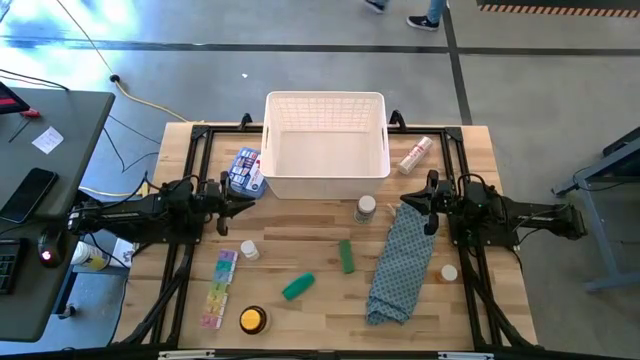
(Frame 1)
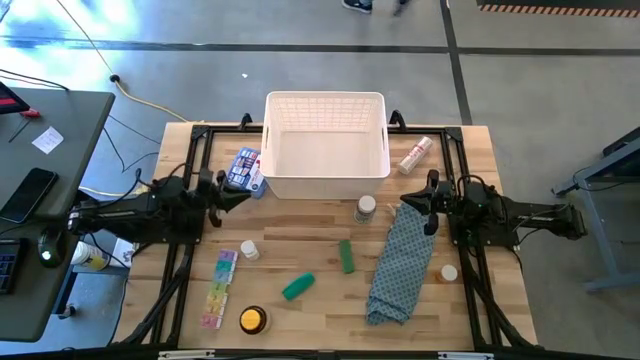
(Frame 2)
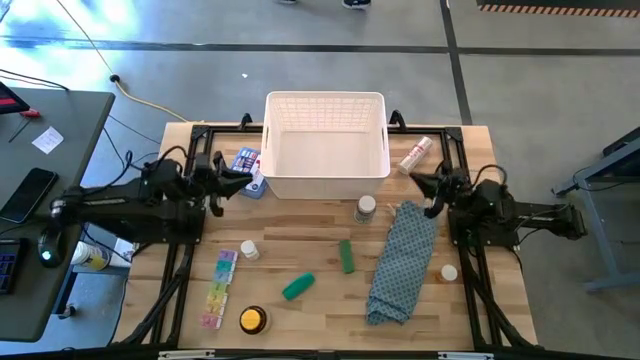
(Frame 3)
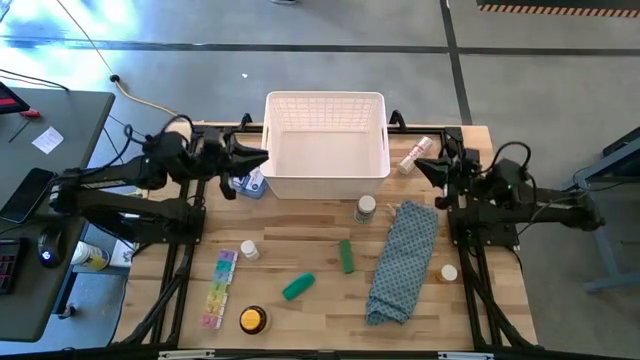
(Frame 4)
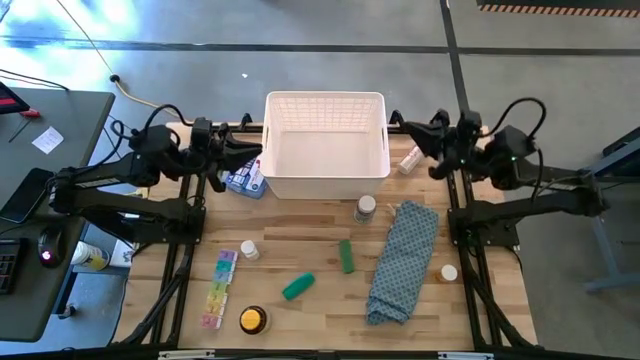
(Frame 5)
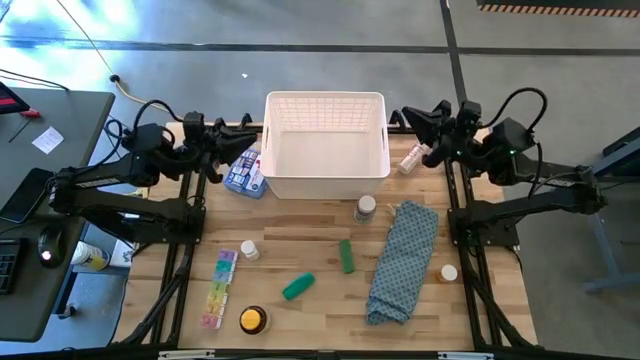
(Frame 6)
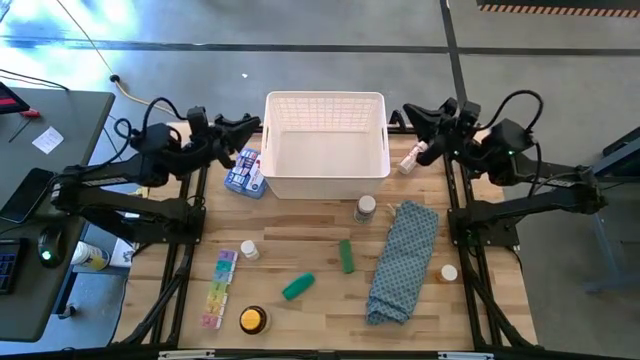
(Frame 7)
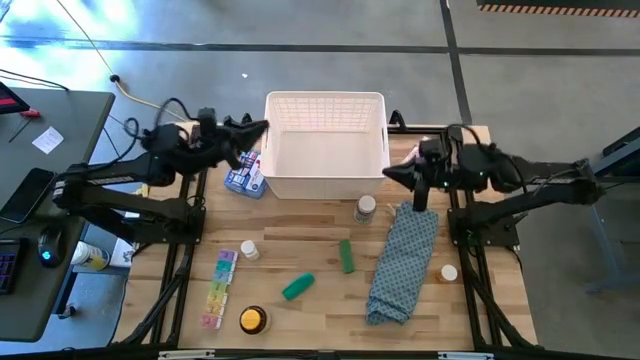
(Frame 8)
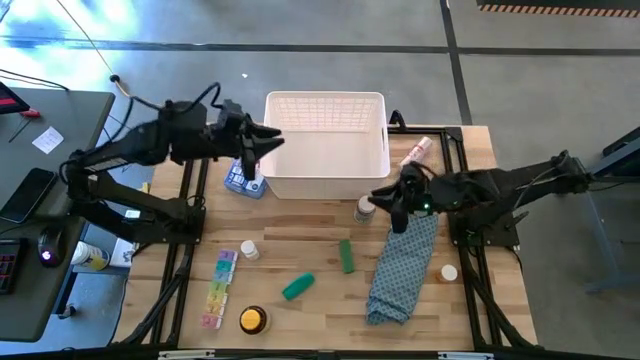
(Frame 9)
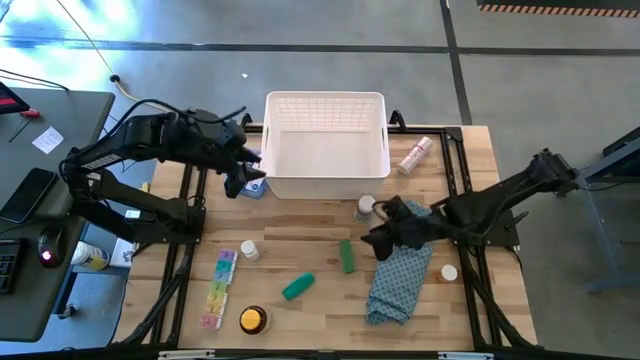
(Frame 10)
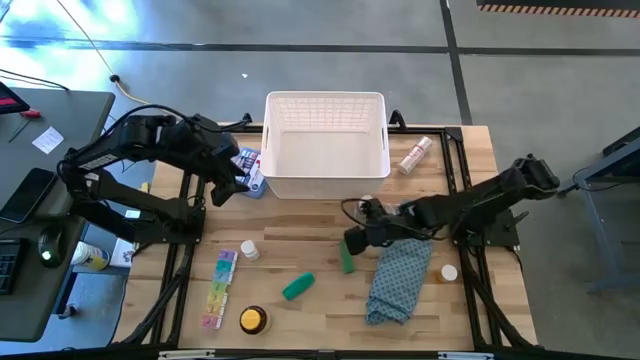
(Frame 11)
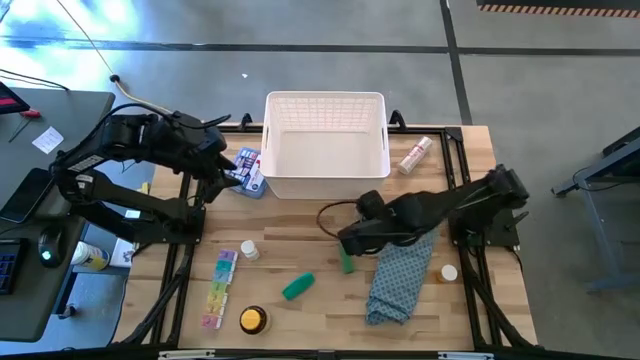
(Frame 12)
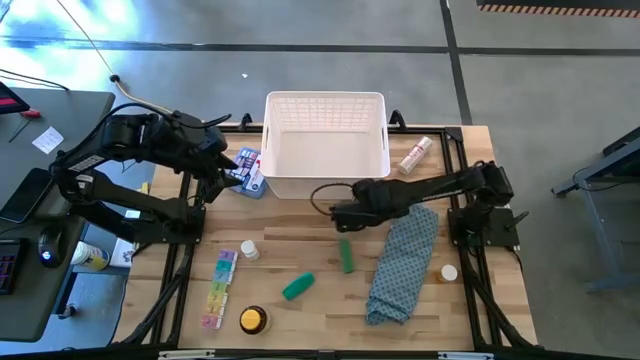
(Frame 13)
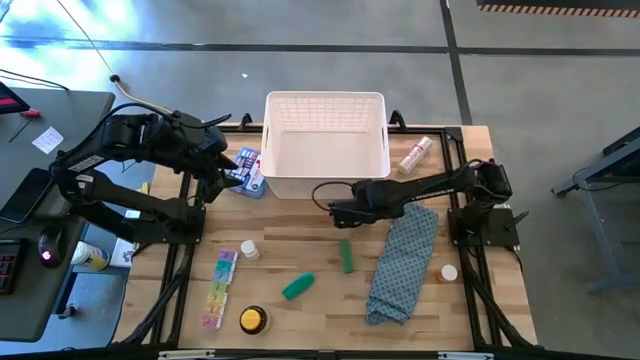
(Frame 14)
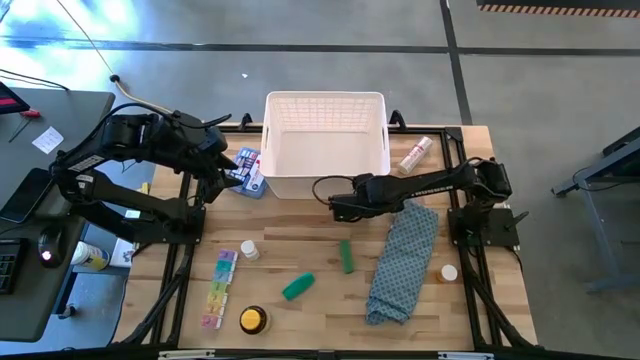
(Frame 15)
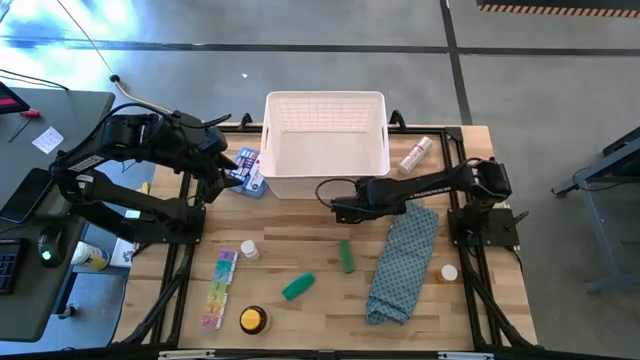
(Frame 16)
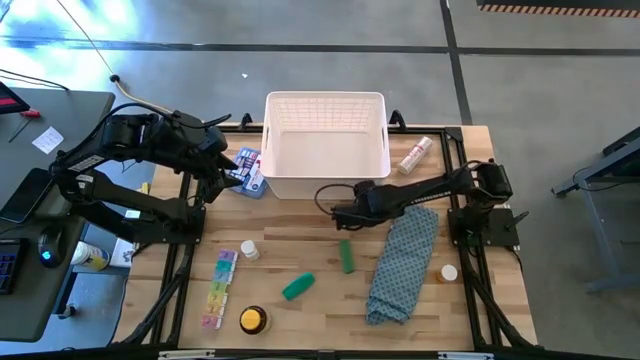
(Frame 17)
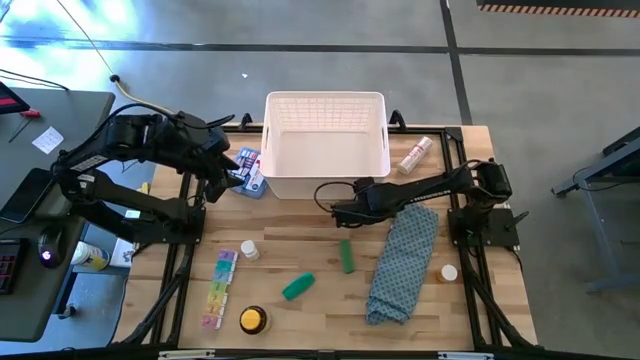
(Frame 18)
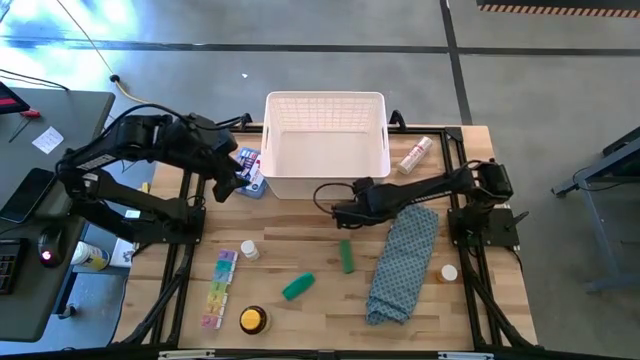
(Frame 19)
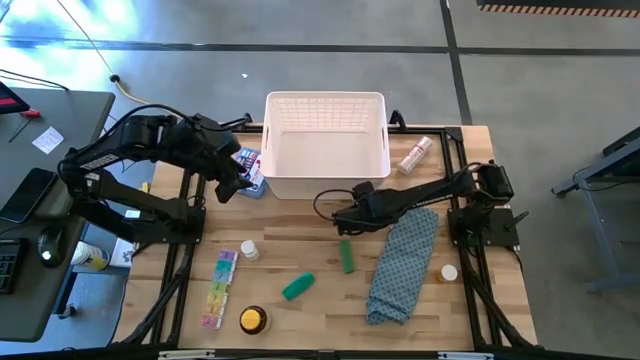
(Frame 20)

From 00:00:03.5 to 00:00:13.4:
Task: Pick & place medical supplies in basket/bin
Put the green pill bottle into the white bin

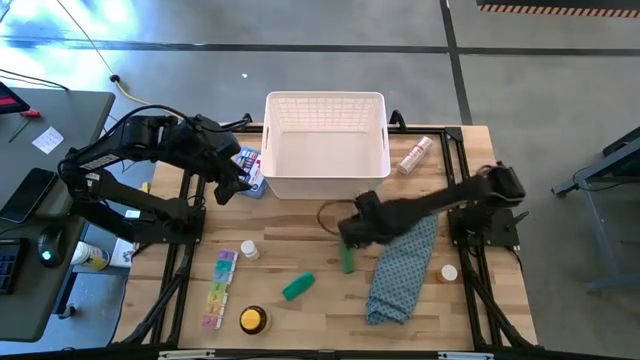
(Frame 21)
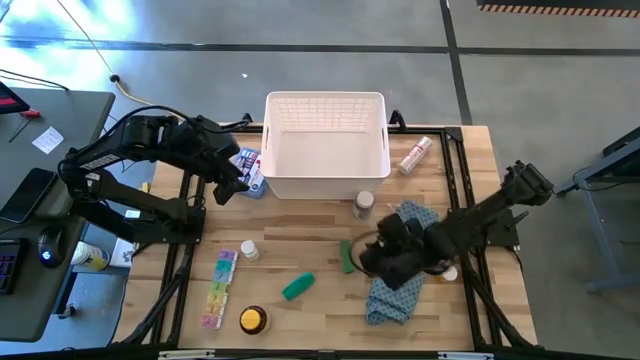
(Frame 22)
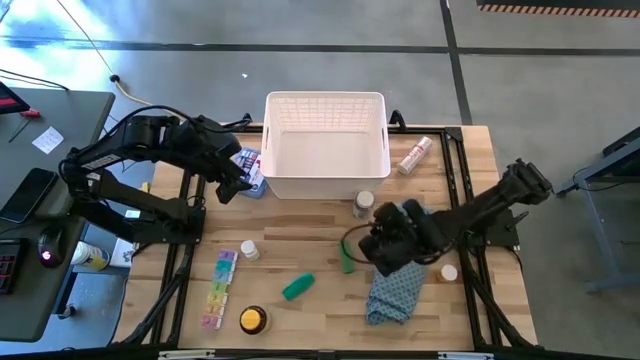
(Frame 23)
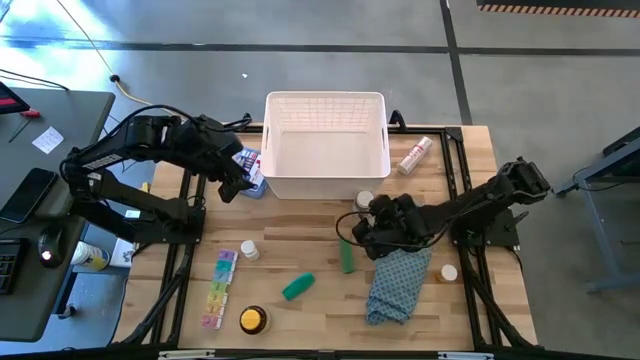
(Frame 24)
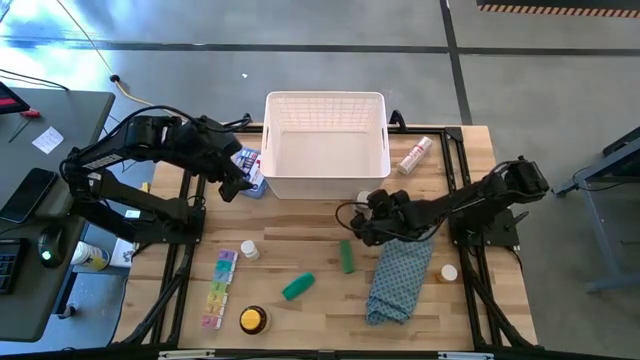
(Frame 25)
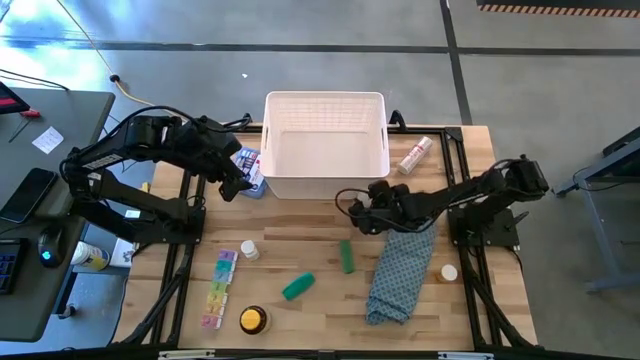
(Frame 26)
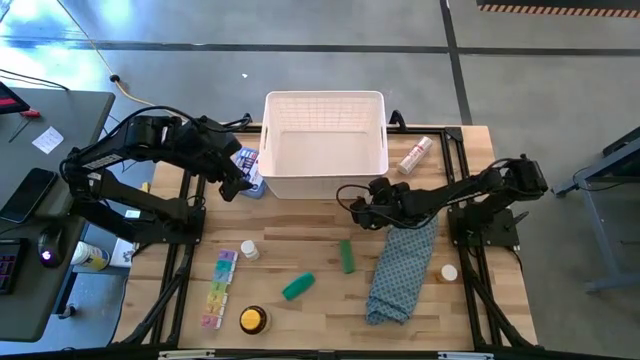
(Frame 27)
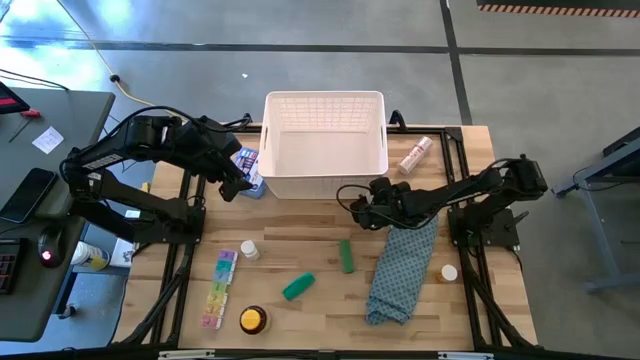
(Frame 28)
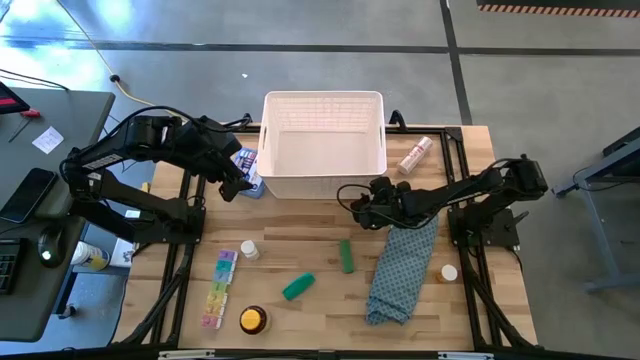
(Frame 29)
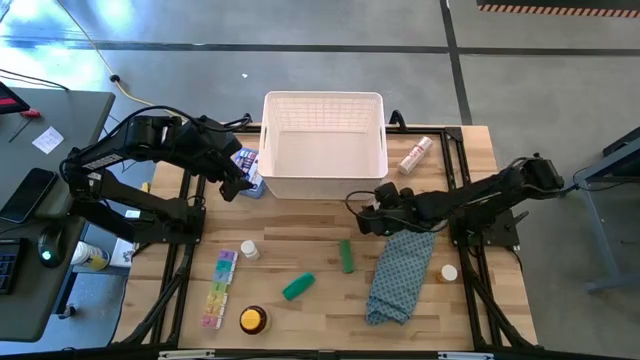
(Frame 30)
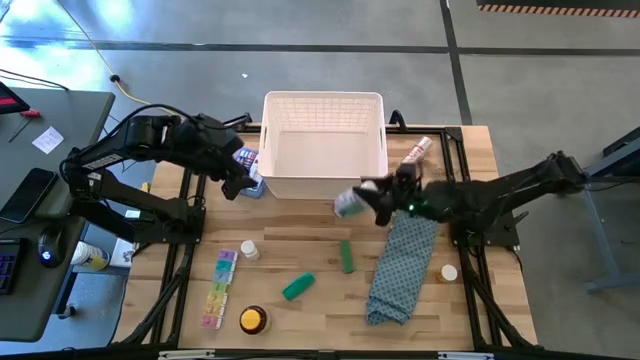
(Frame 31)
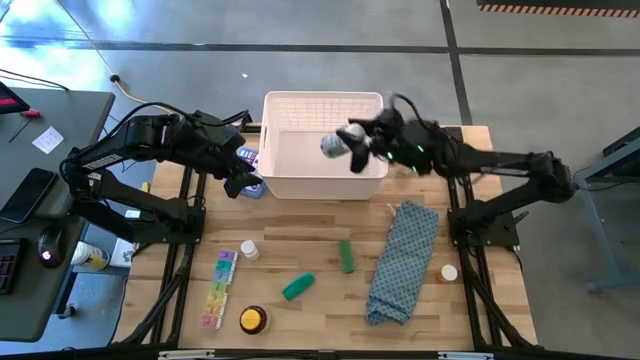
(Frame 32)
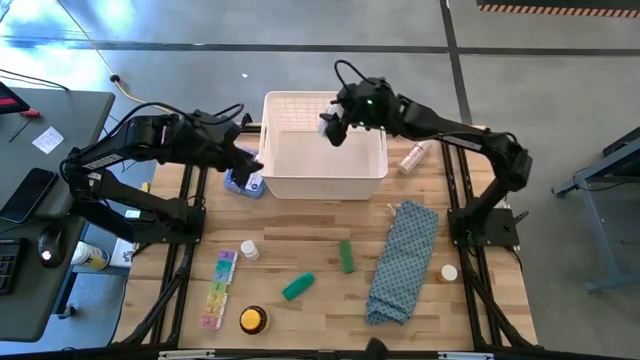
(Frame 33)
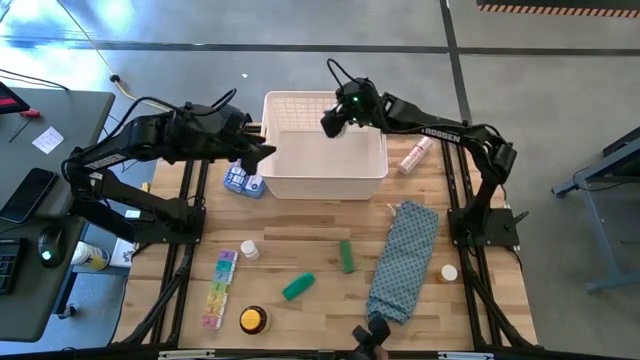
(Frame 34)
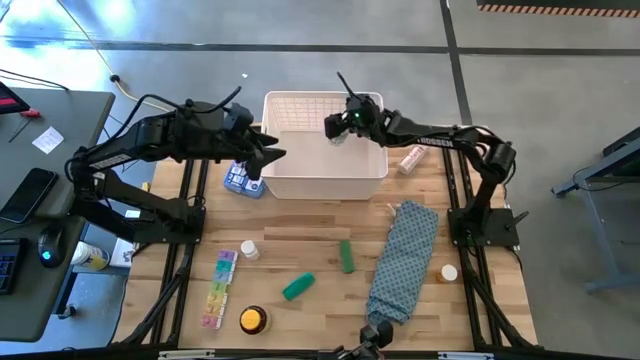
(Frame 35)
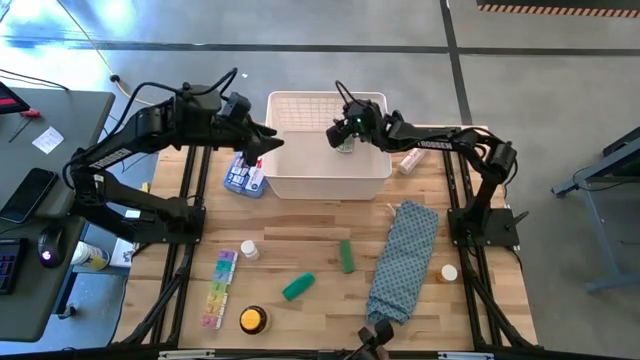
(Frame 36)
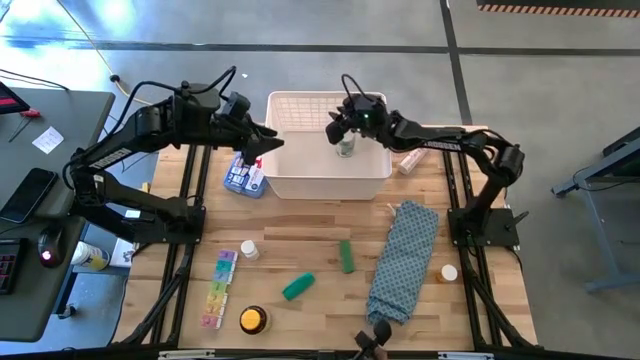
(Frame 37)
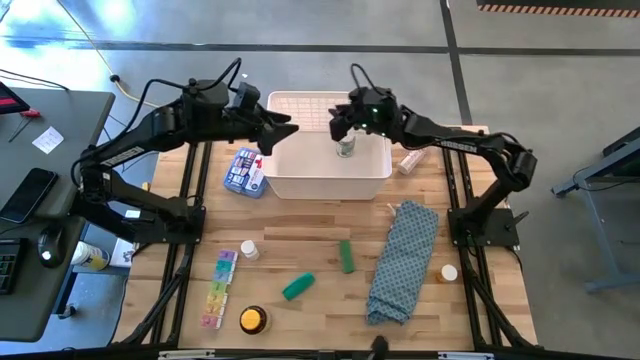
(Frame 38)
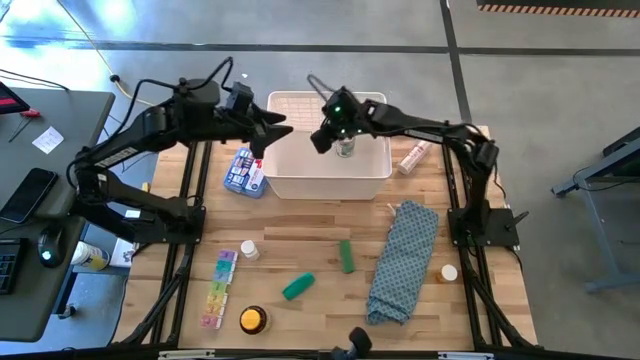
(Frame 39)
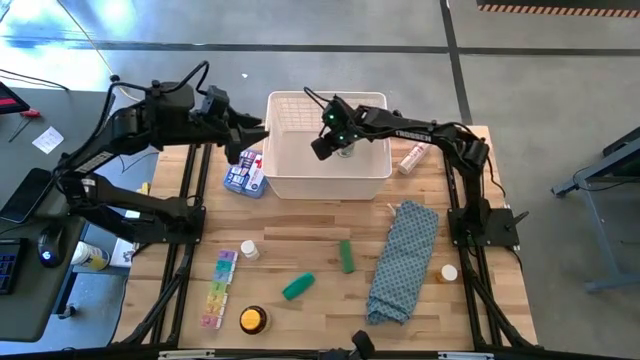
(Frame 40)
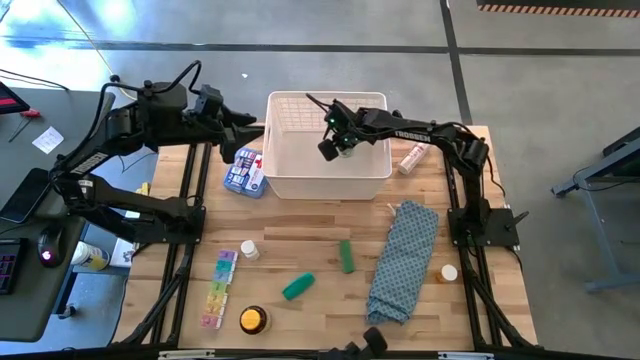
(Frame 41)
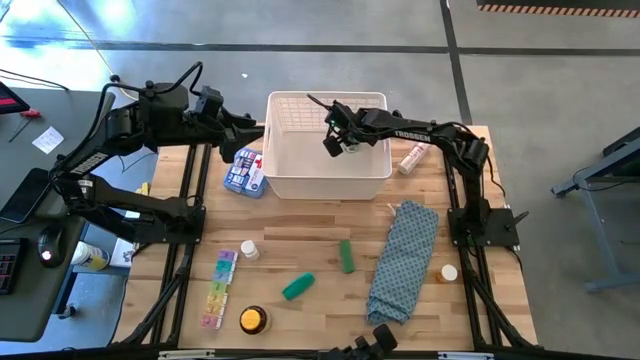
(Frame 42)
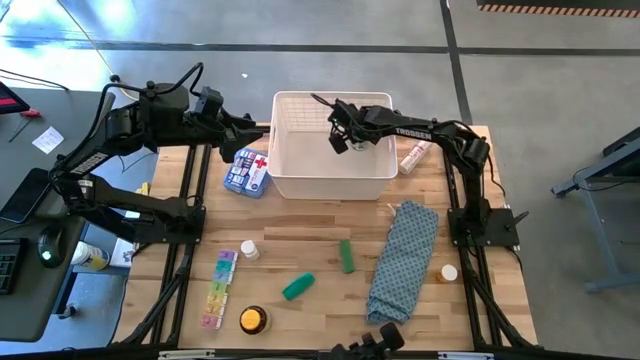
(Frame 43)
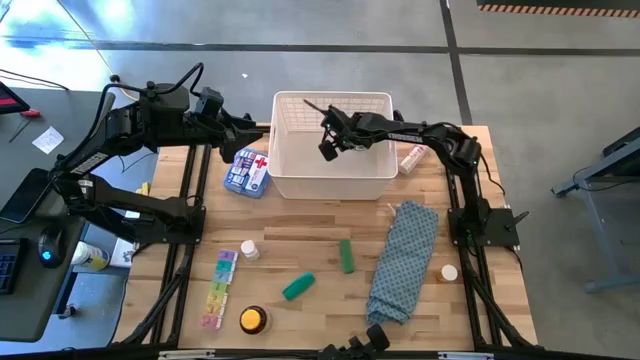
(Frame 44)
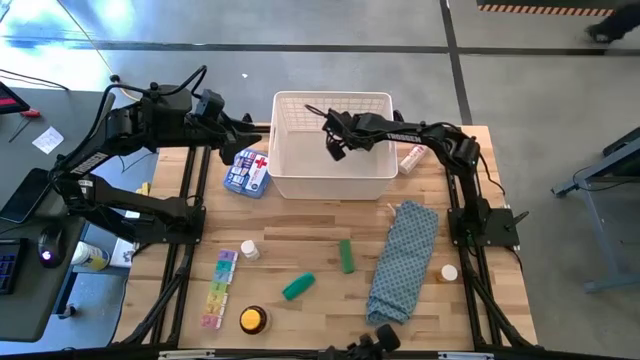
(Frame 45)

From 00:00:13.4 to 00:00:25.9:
Put the green pill bottle into the white bin
